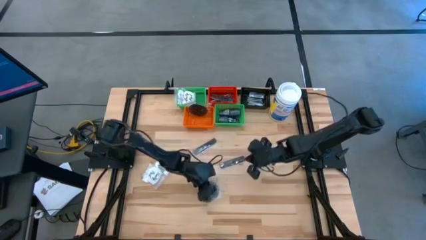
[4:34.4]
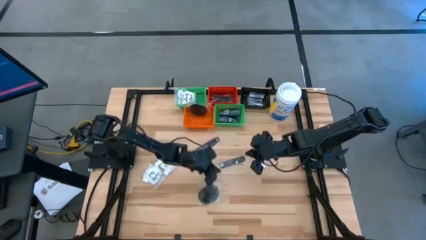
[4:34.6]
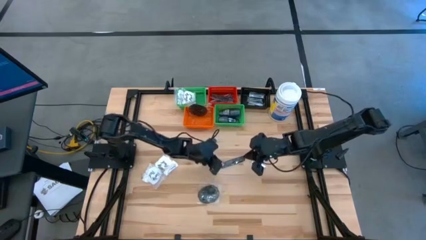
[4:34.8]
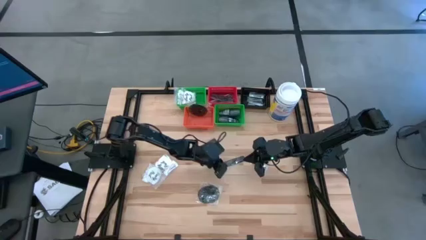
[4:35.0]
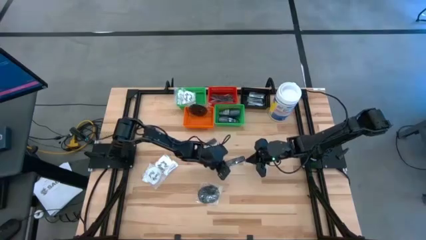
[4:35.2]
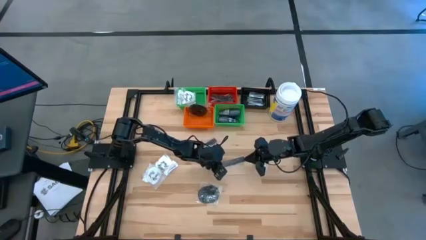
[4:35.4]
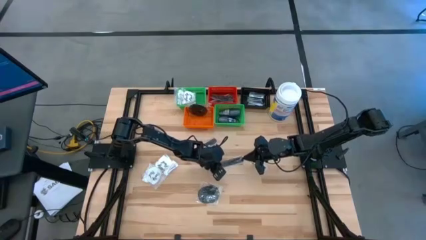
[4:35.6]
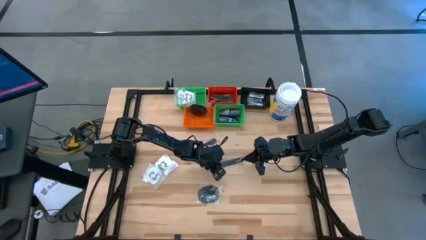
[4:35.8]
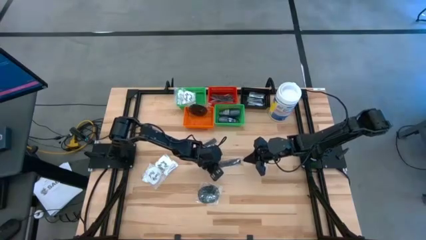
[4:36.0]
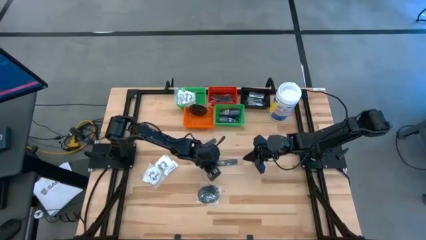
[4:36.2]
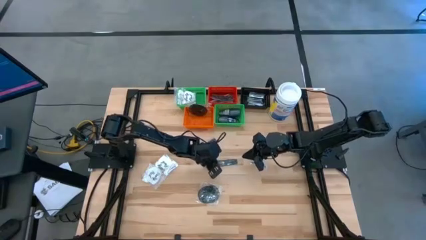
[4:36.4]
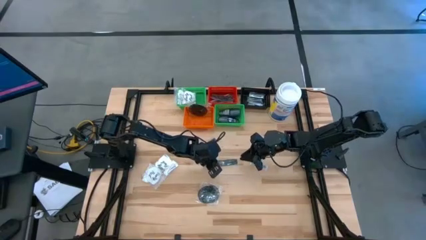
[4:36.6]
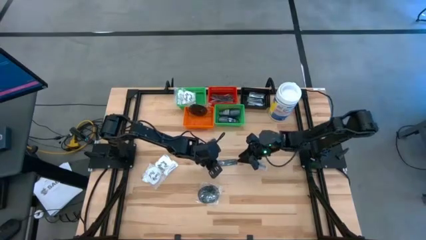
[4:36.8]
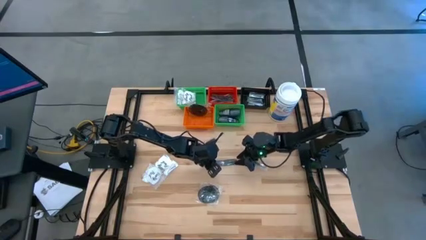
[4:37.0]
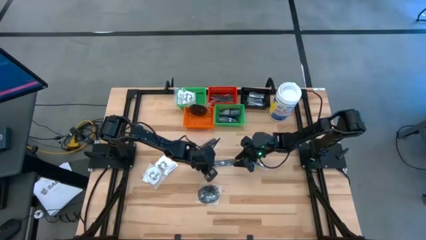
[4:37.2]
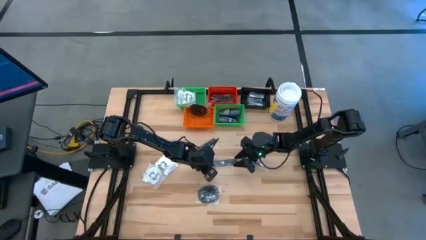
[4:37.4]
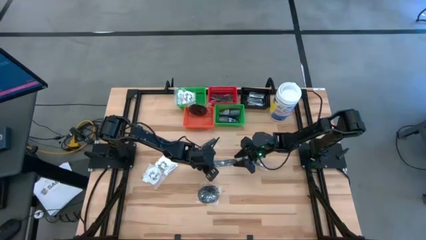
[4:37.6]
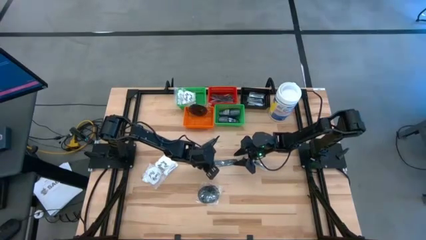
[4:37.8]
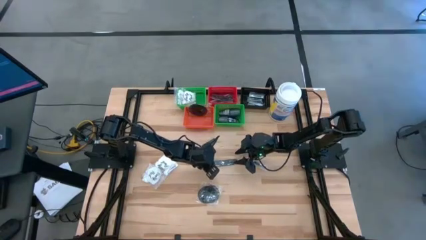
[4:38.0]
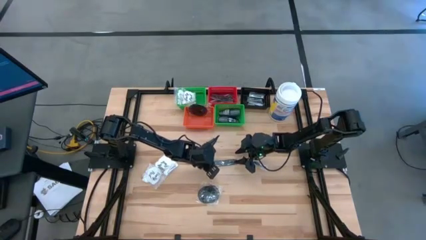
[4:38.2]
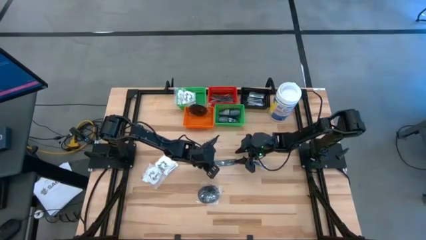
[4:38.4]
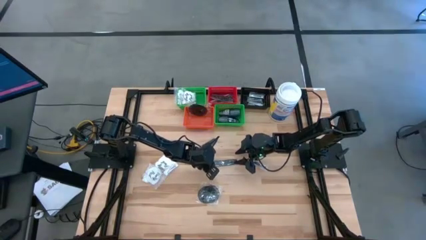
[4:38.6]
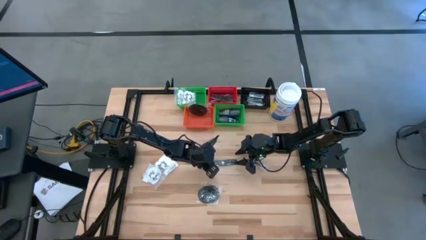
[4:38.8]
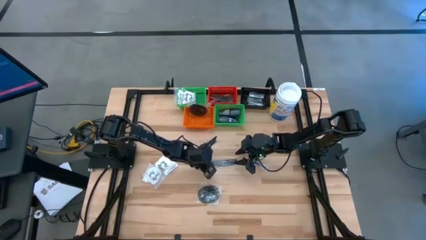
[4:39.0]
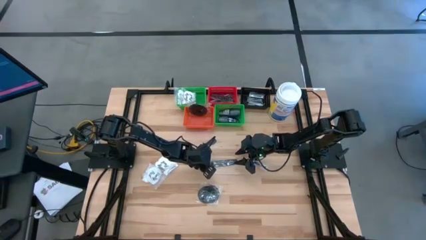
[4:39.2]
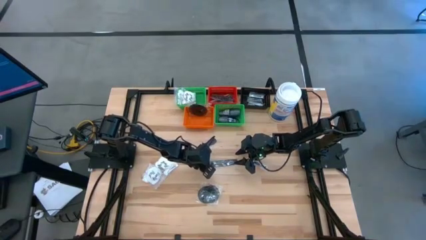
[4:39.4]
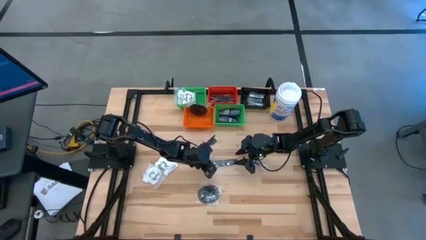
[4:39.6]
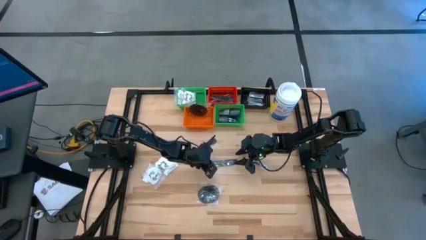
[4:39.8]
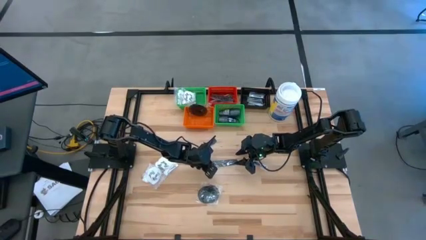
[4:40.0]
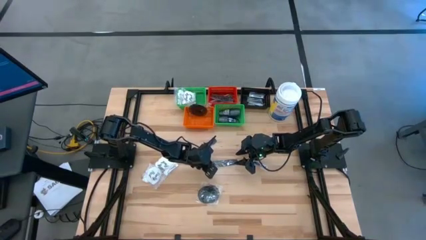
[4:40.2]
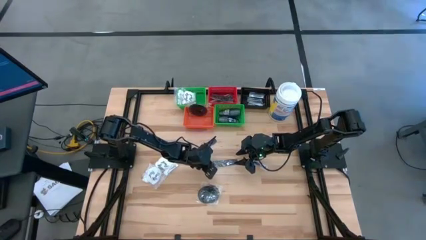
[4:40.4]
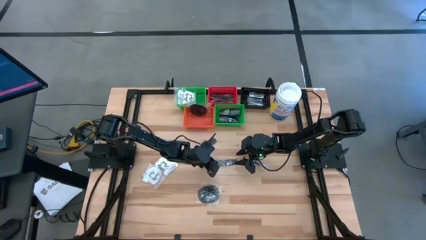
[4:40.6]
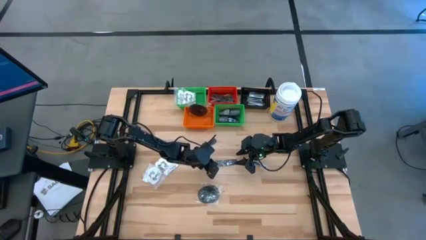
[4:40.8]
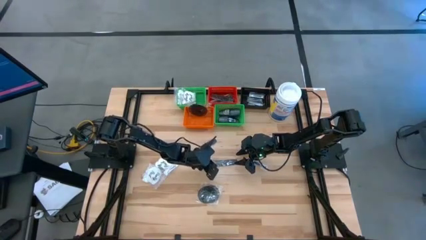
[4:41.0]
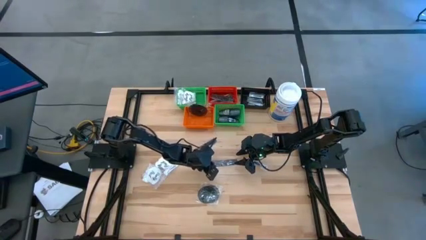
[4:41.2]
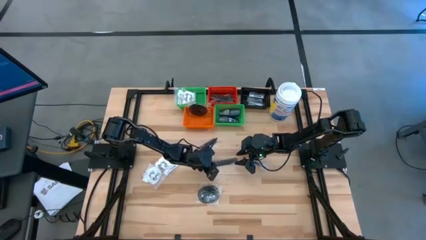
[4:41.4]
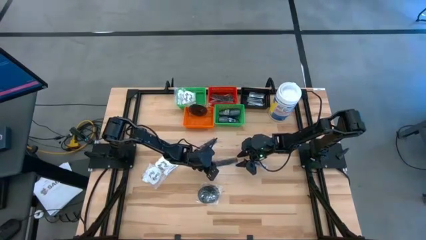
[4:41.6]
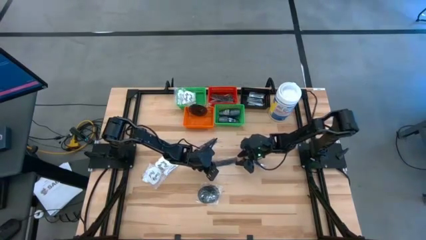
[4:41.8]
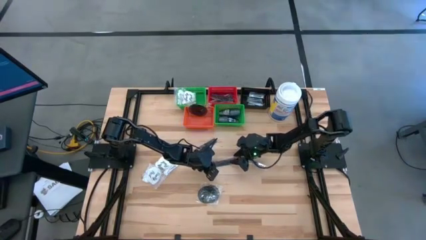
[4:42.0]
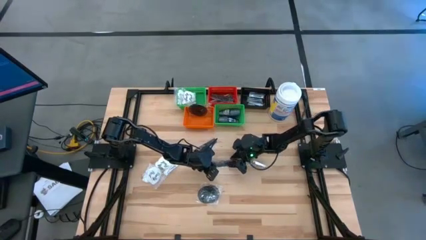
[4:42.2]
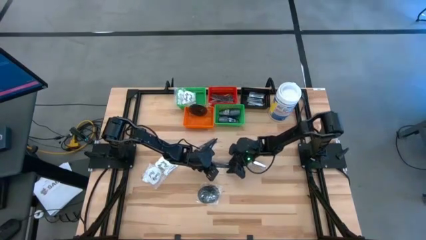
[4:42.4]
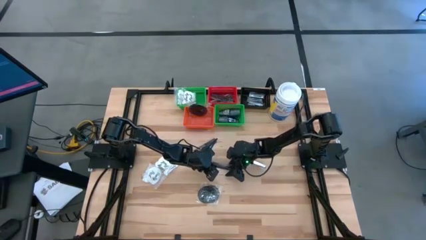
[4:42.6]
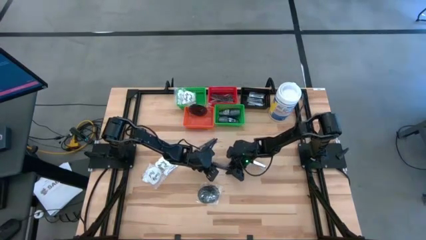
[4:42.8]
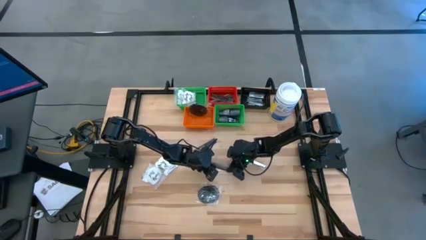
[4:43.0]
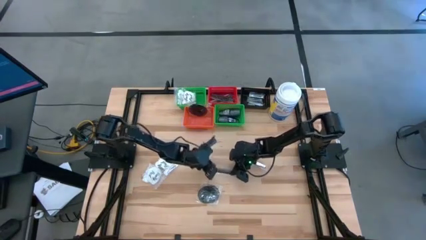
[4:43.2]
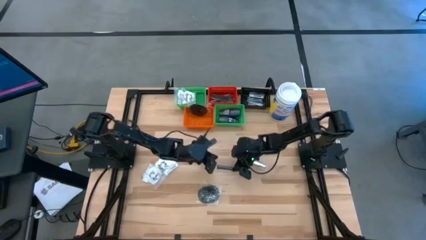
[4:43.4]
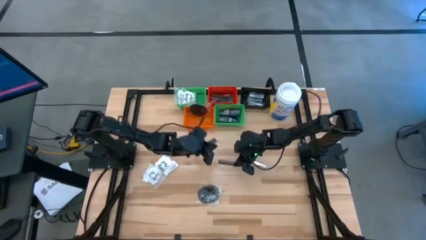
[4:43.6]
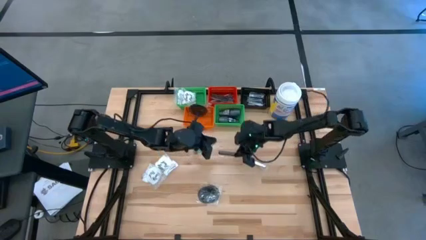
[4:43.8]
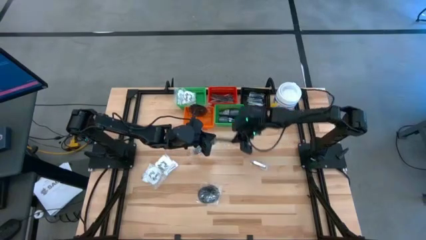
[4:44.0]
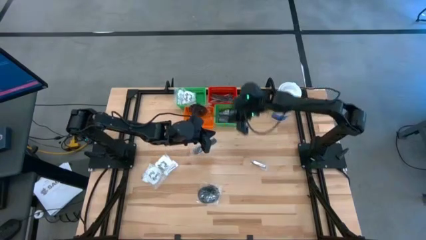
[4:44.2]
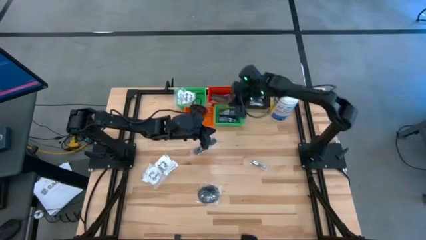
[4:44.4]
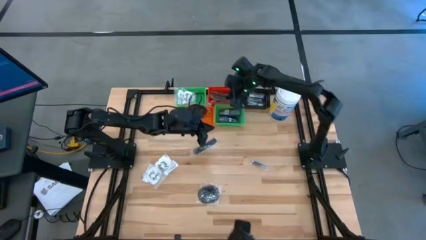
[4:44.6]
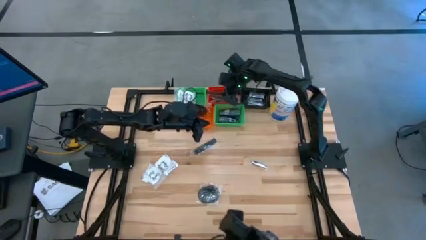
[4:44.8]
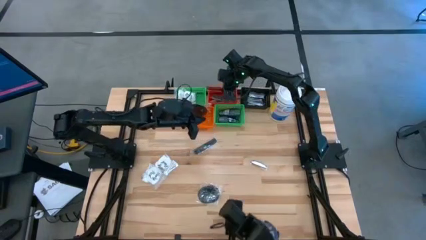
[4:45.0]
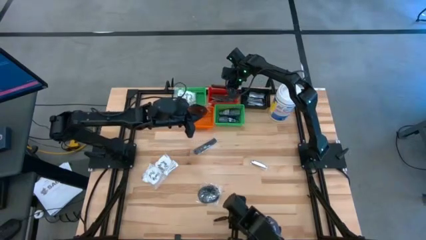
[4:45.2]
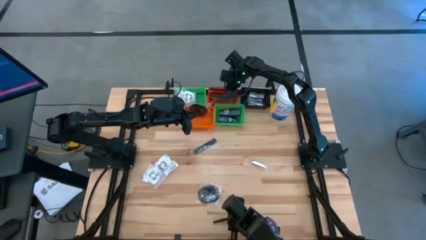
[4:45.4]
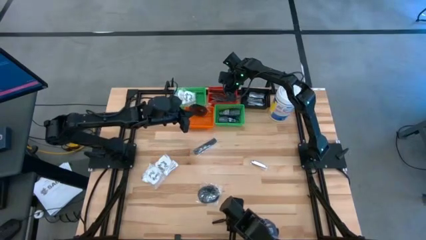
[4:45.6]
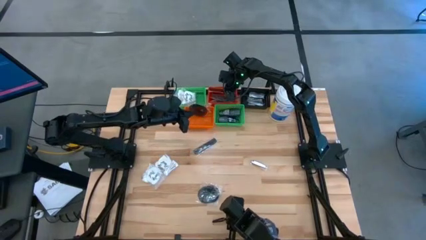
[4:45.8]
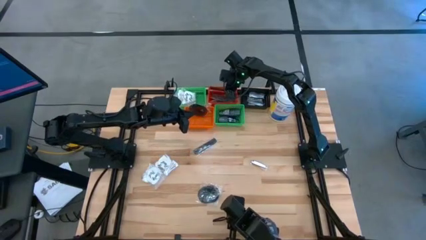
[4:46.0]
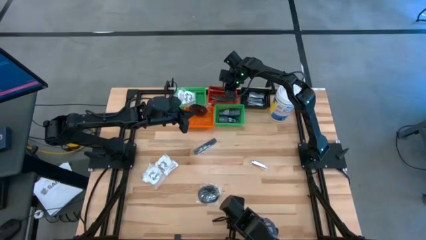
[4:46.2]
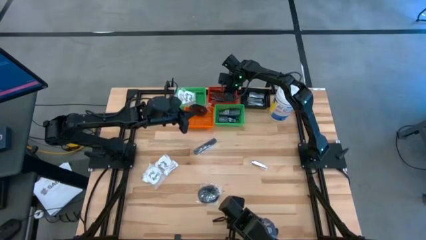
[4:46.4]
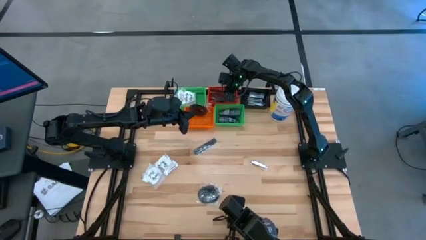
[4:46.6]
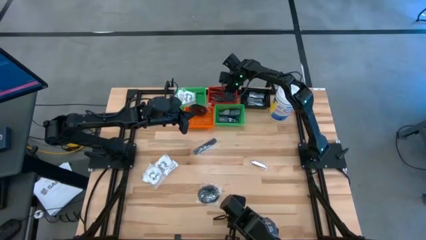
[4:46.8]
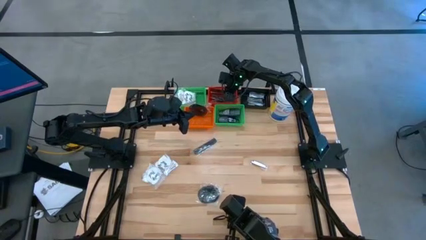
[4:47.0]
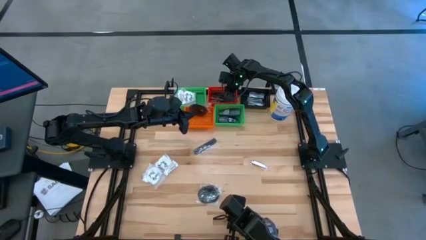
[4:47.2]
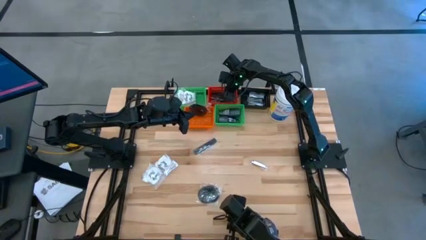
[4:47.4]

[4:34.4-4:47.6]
Task: Pick & Place Travel size toiletries
Put the black comb into the red bin

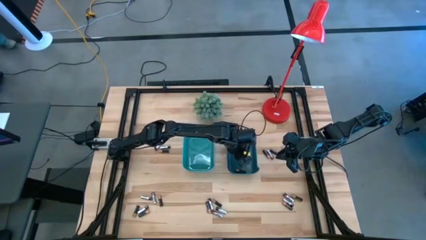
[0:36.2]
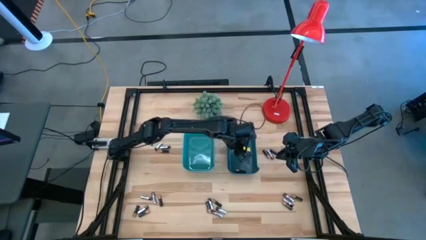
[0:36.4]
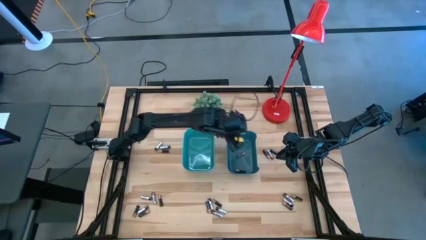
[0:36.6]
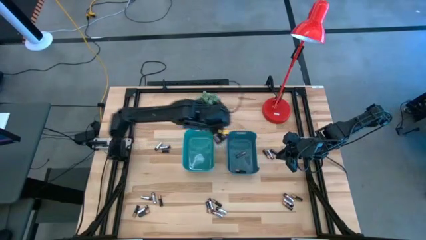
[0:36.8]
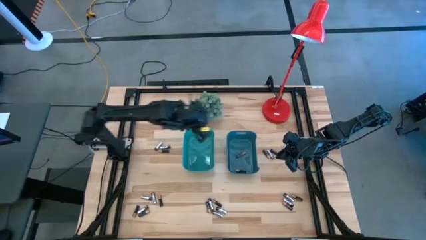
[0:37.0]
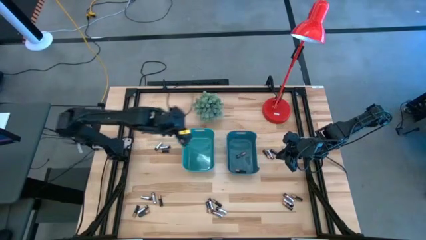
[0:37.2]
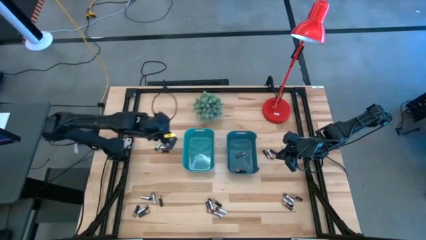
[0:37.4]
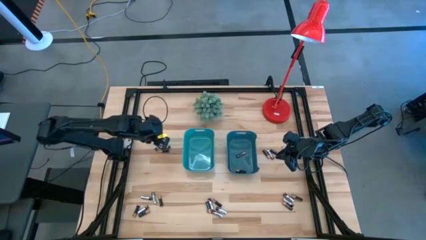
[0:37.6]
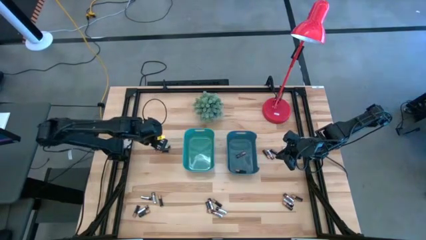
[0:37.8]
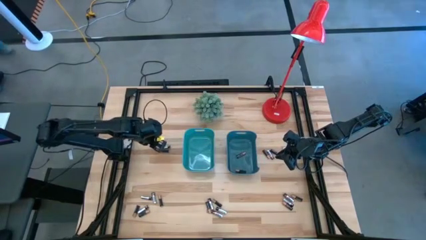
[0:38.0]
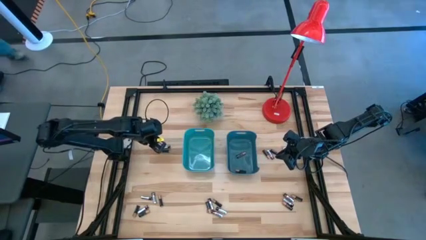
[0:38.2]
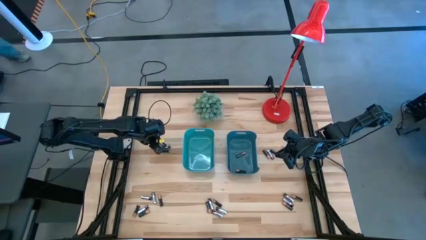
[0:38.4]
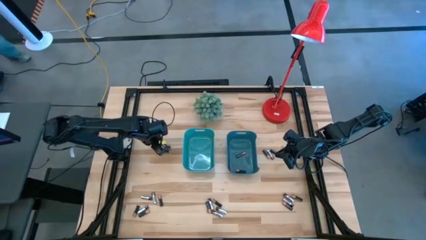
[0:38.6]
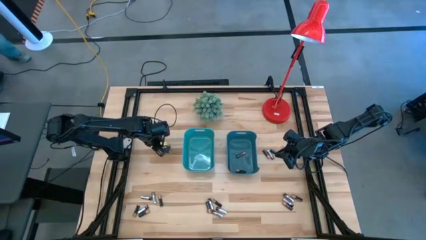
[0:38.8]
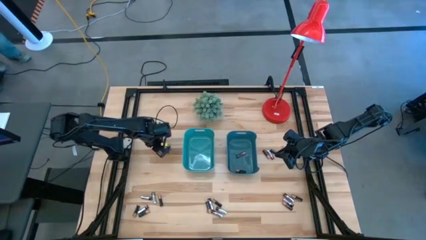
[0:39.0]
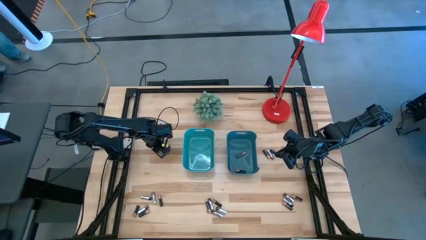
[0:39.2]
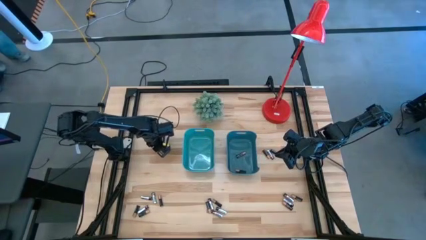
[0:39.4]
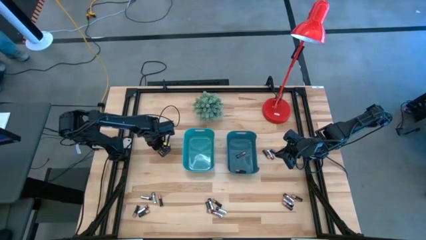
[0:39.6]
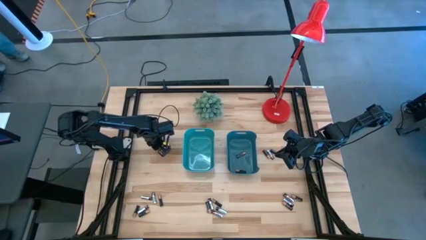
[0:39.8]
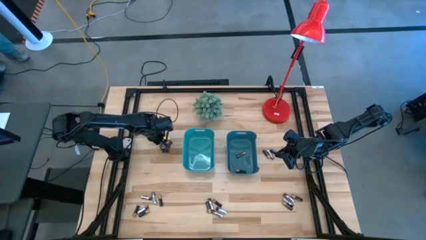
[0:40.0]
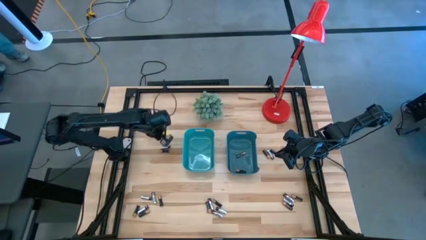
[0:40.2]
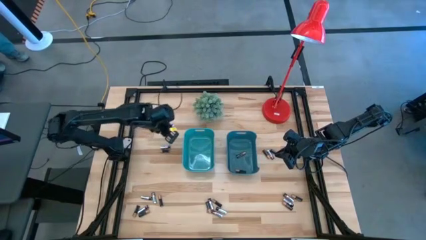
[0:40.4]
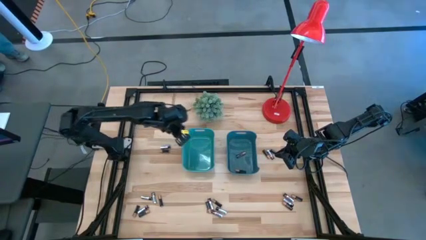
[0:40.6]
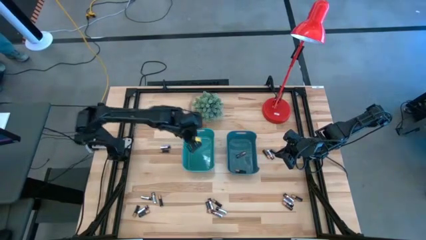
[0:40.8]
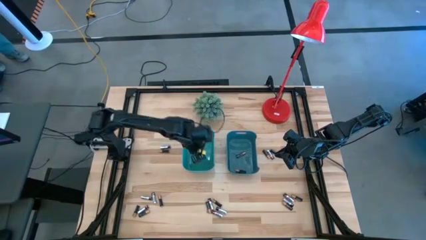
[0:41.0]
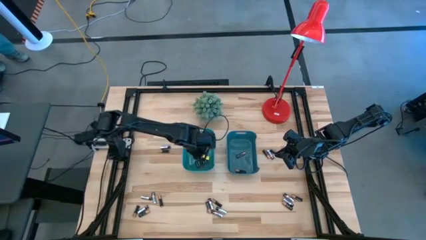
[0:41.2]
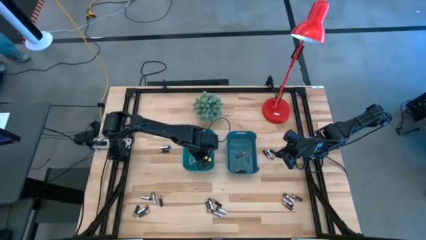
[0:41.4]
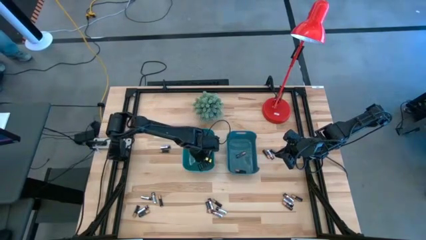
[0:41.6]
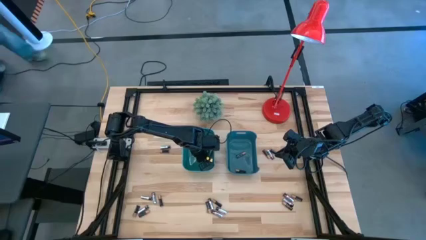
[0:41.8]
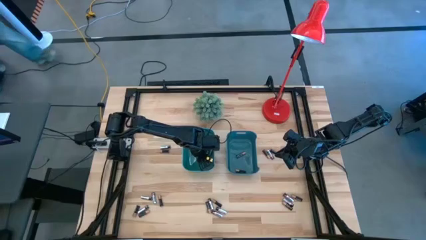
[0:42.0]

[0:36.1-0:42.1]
Task: Sort batteries
Put the silver battery into the green bin
